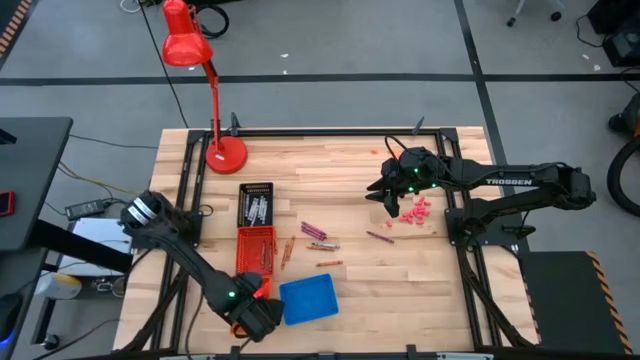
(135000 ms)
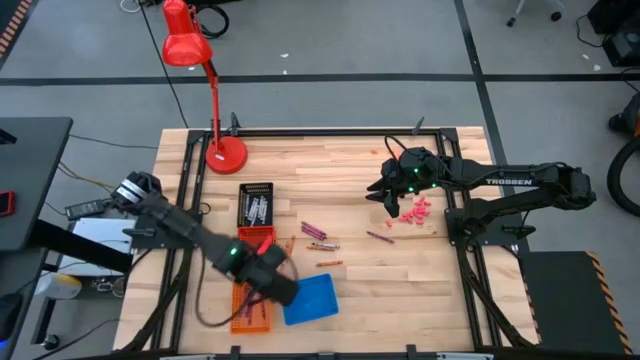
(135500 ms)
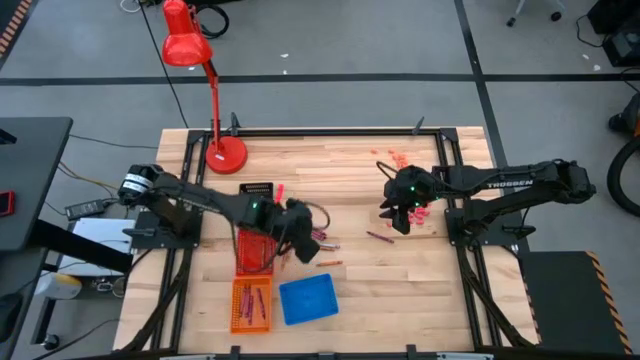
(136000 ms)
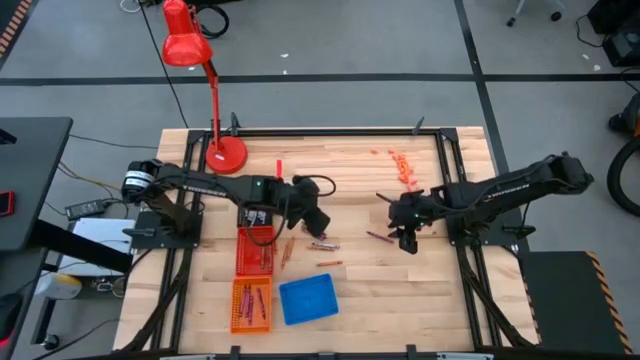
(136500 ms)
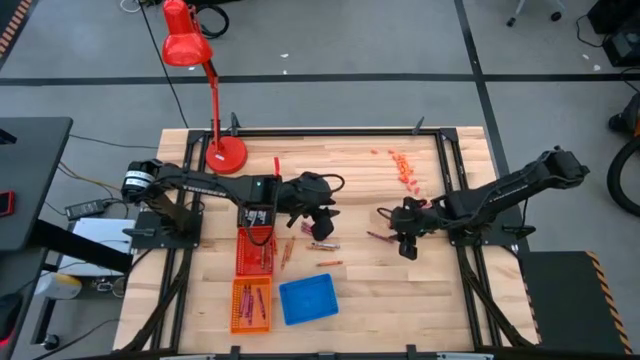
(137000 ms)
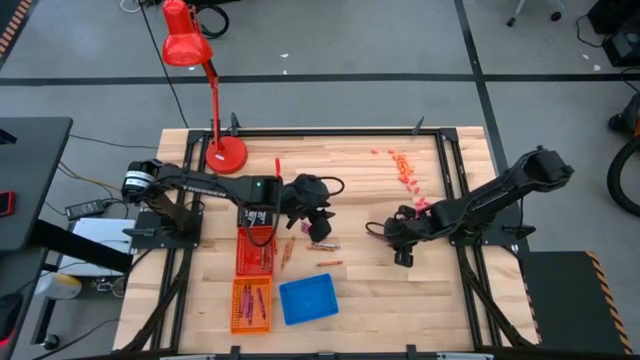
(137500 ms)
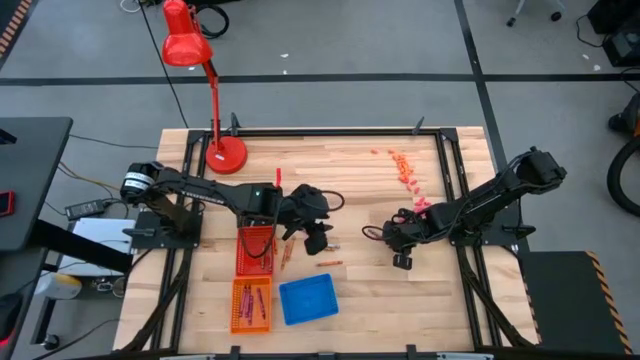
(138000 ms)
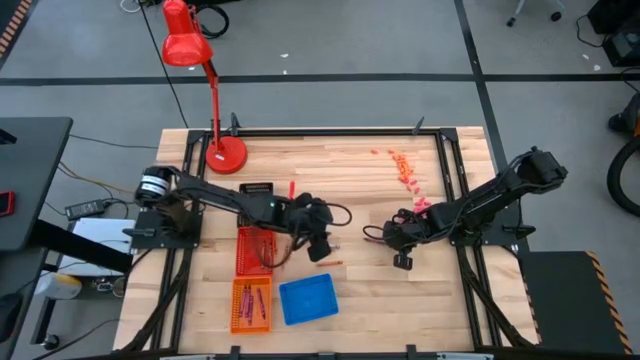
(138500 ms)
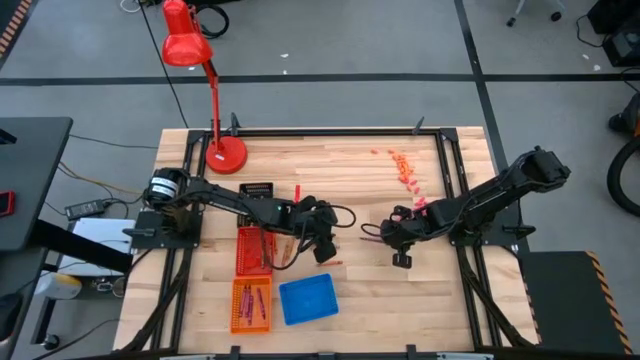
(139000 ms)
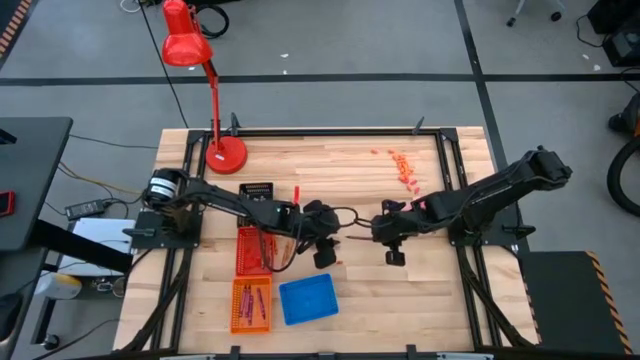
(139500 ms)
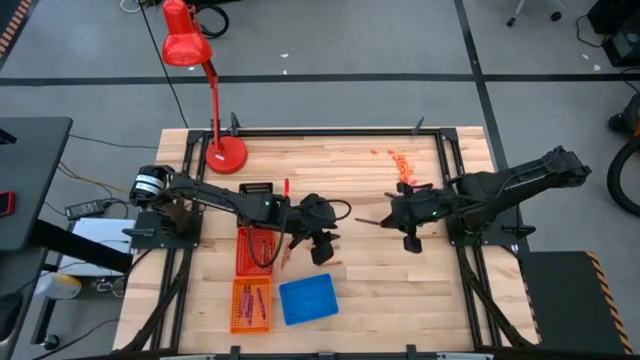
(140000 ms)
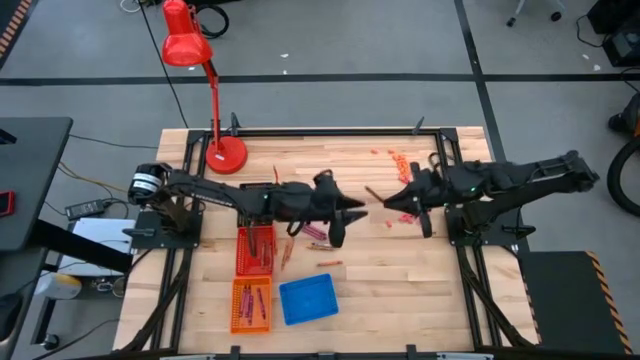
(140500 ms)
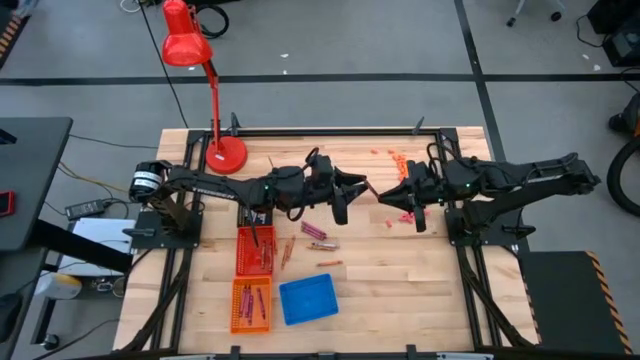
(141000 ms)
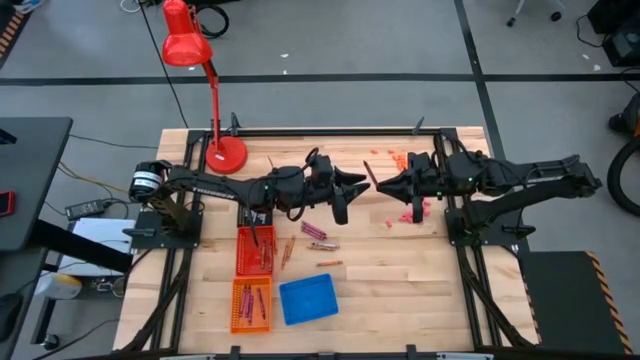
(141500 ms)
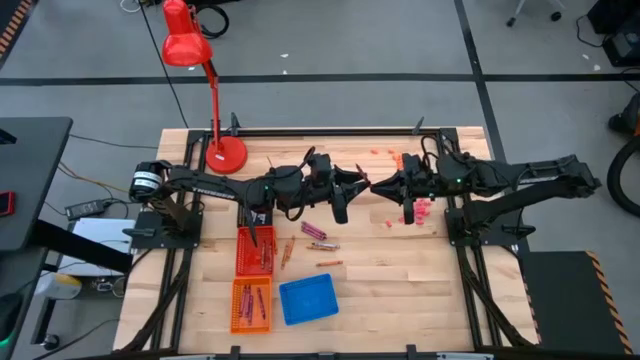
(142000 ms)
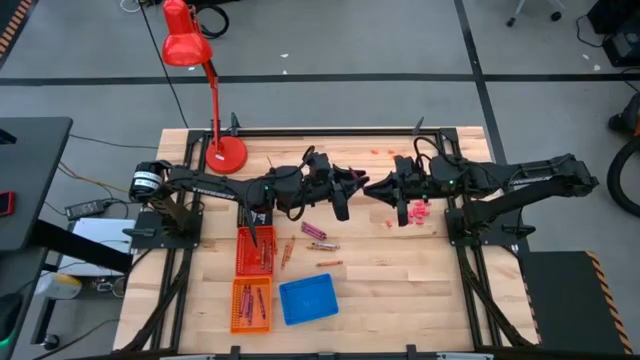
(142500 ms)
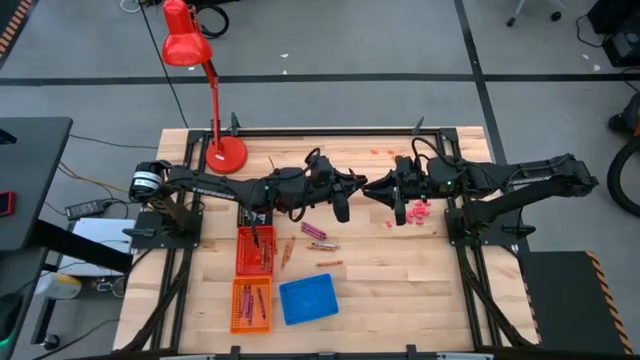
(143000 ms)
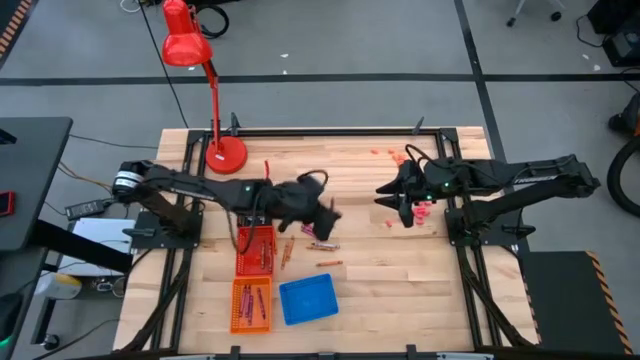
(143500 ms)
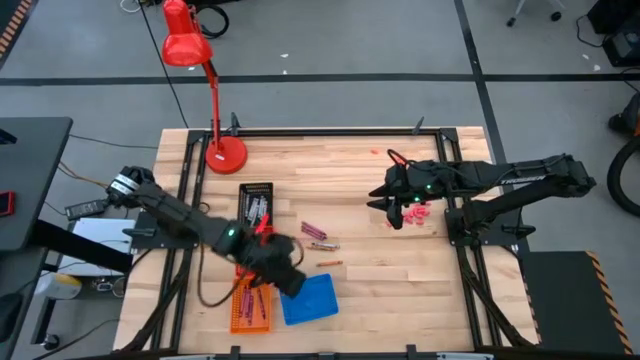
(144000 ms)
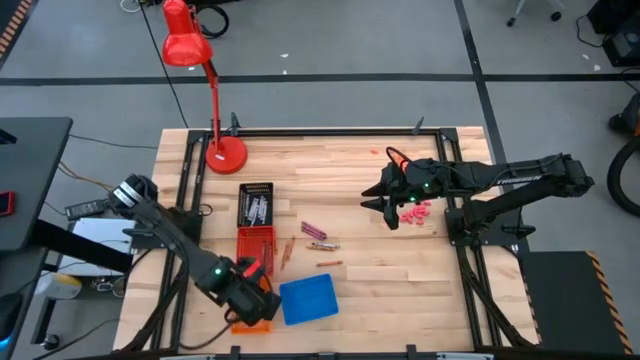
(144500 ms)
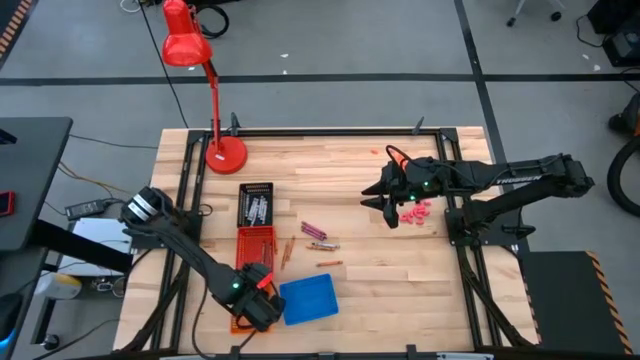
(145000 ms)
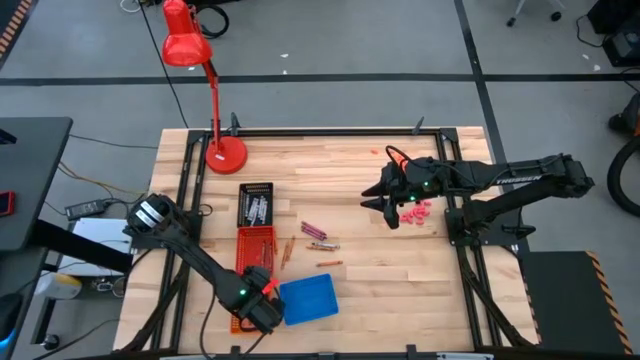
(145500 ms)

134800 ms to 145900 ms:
Task: Sort crayons
Put the red crayon into the orange bin

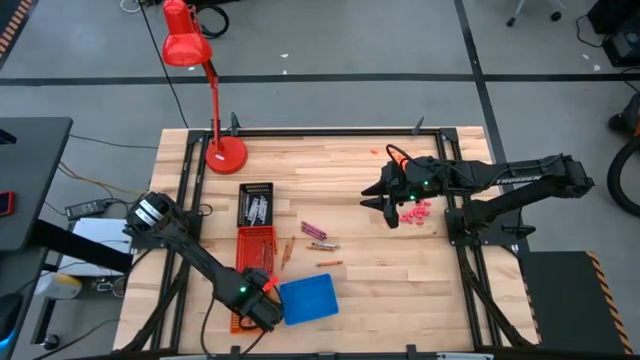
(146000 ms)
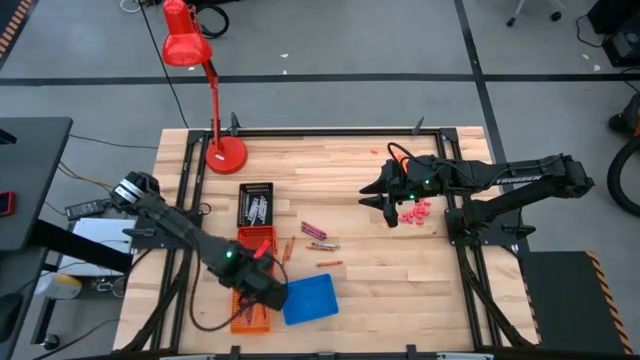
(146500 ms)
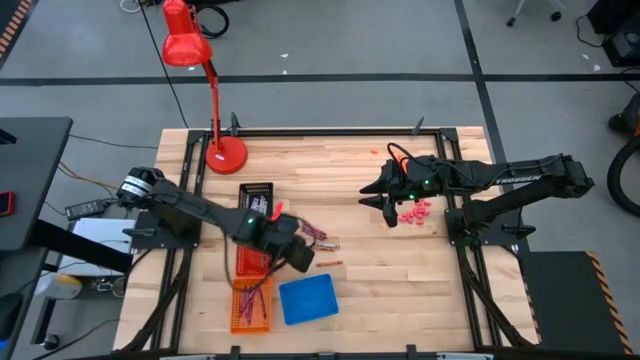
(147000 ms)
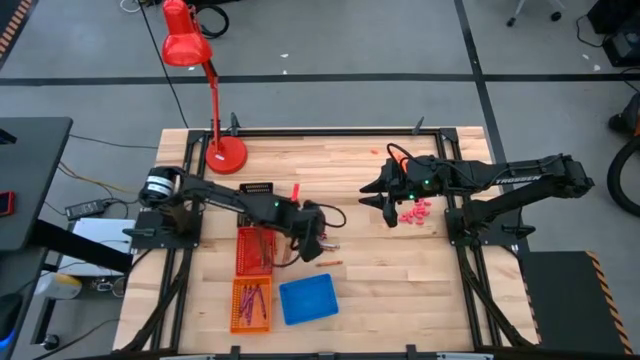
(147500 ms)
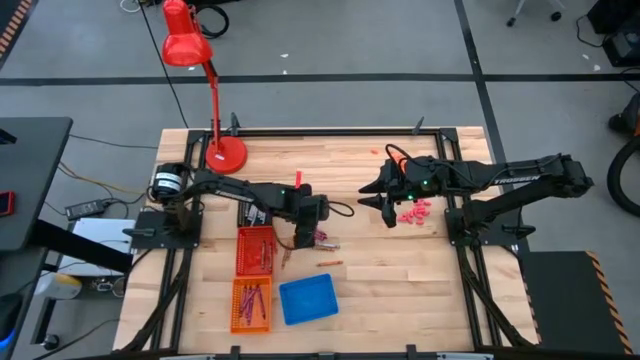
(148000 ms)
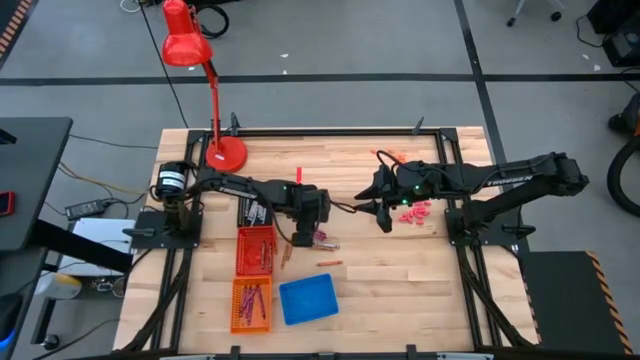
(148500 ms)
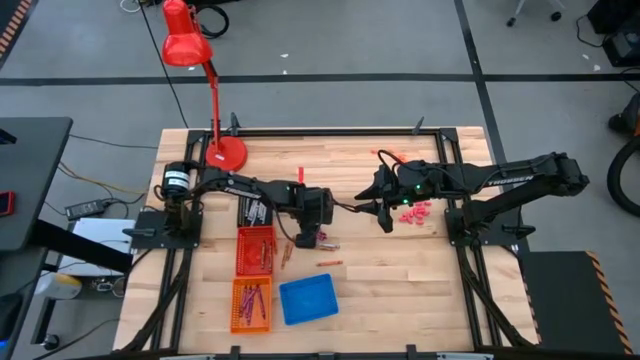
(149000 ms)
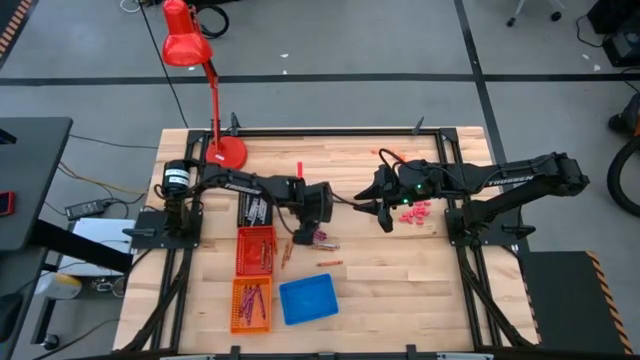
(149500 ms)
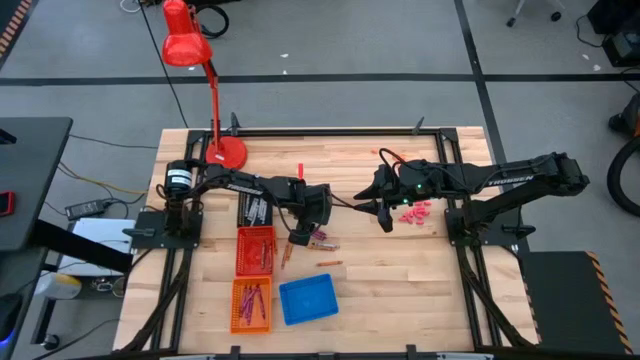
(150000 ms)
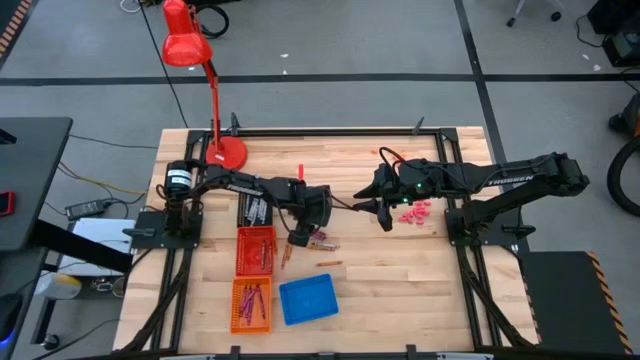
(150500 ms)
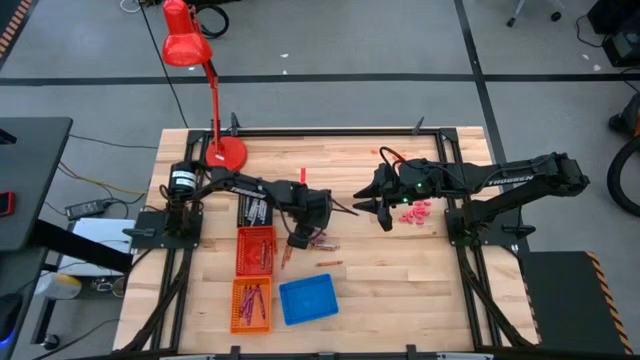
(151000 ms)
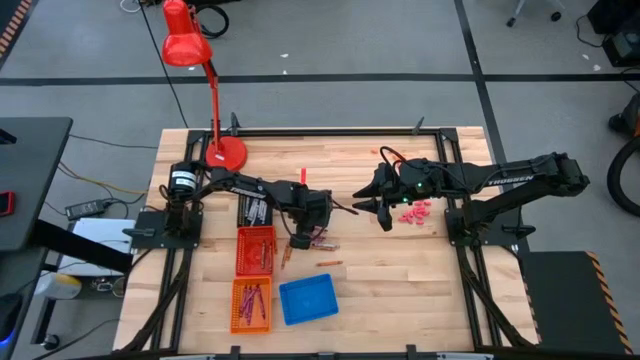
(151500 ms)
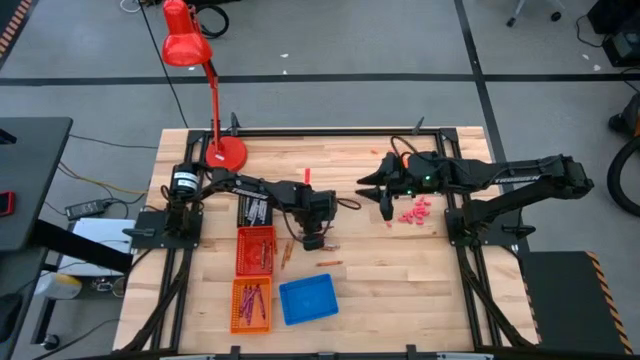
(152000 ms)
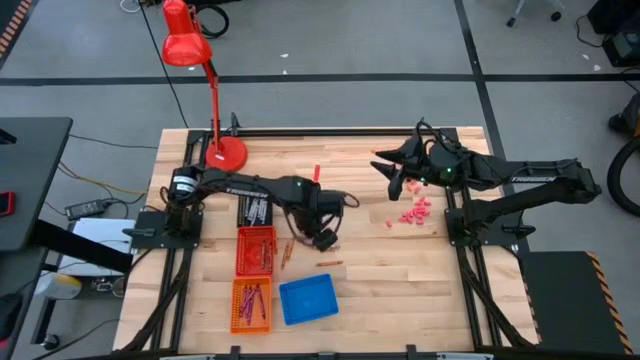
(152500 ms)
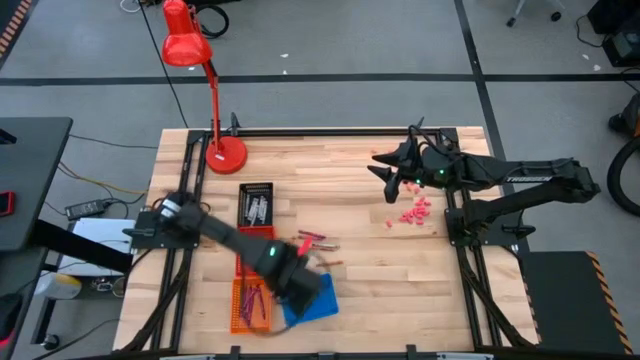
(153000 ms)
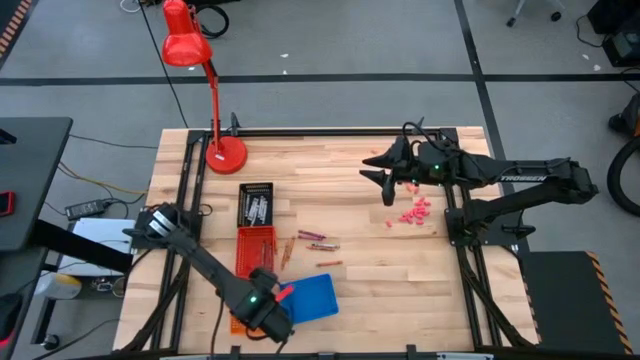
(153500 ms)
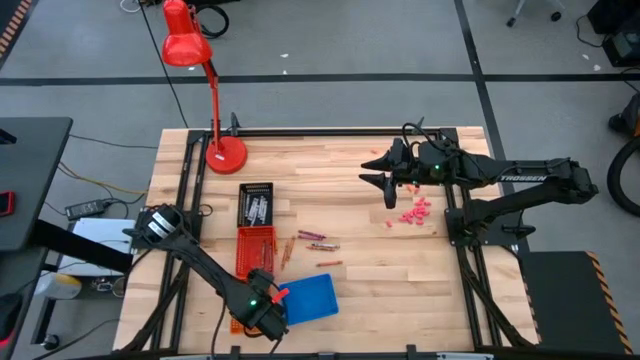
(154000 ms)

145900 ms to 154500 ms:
Put the red crayon into the orange bin

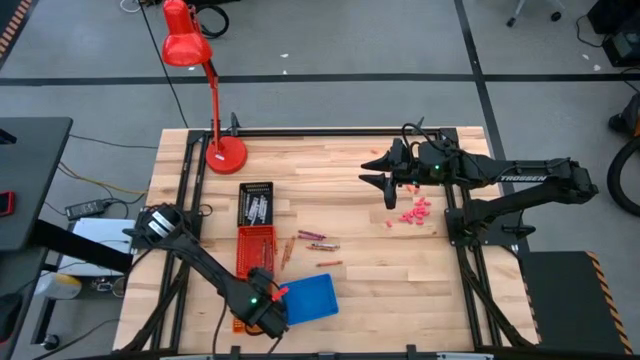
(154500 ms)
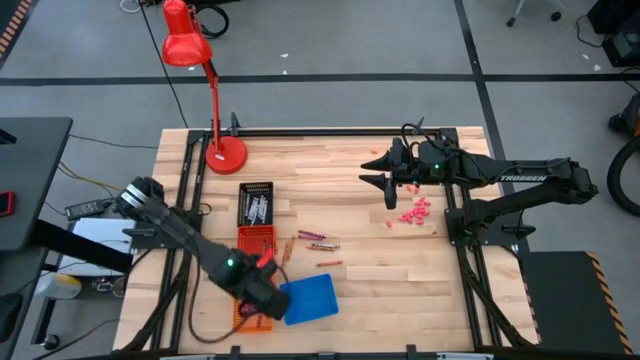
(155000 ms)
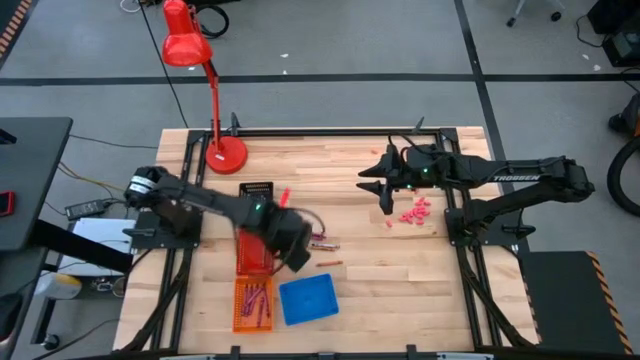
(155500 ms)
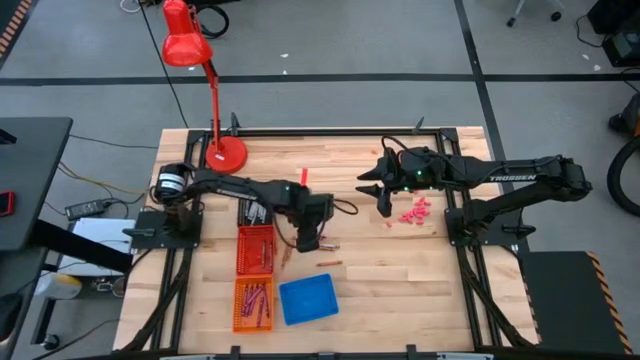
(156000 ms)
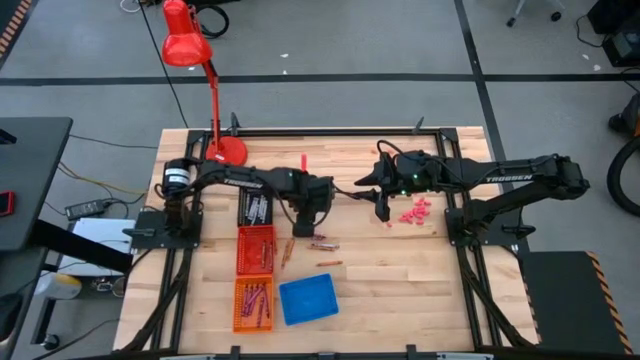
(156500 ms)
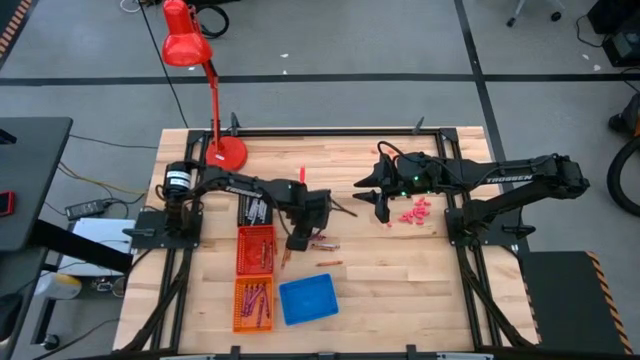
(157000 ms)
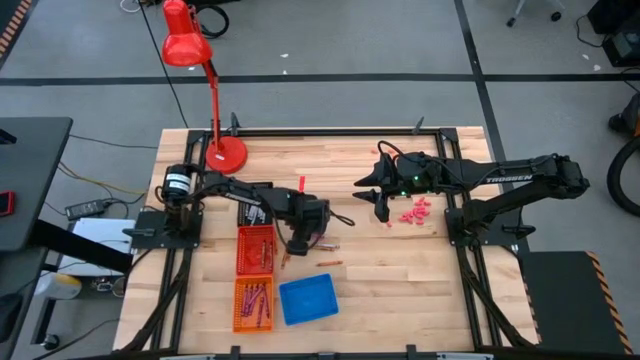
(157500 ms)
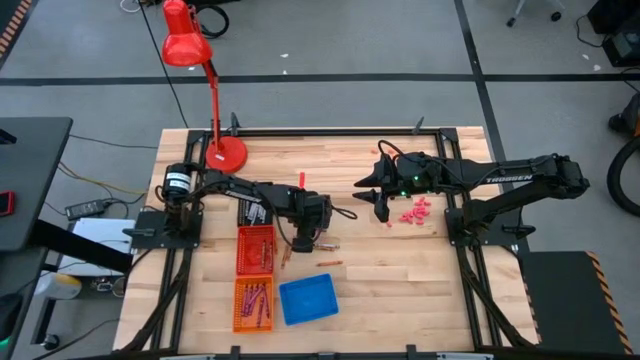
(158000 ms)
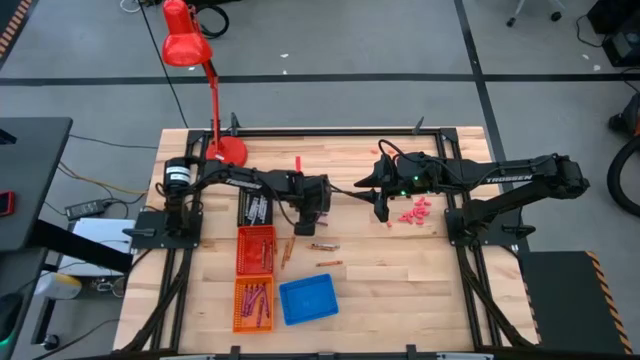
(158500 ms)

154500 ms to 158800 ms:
Put the red crayon into the orange bin
